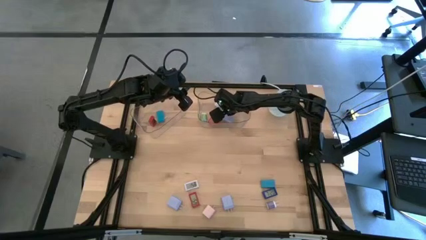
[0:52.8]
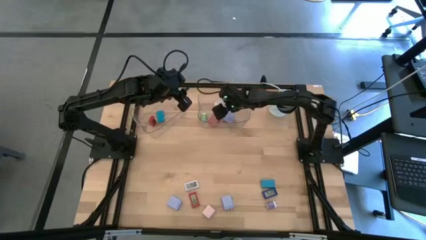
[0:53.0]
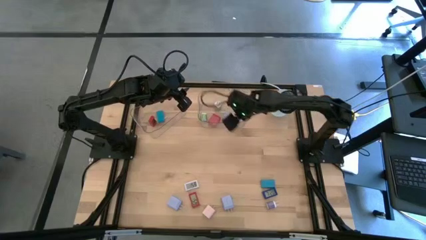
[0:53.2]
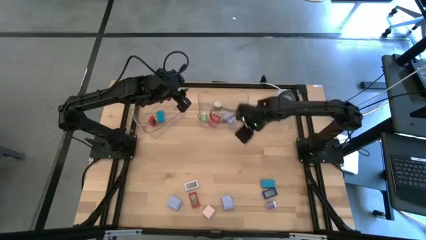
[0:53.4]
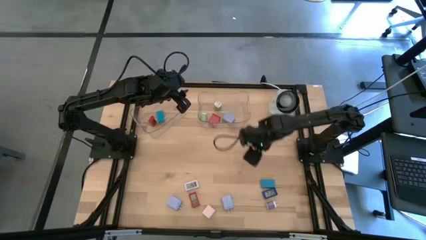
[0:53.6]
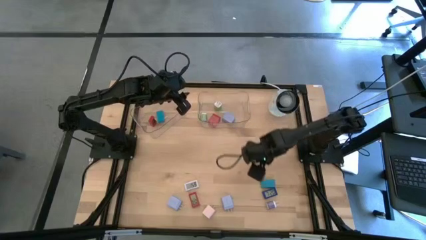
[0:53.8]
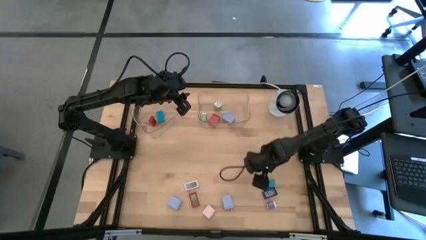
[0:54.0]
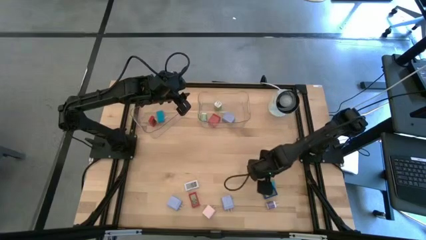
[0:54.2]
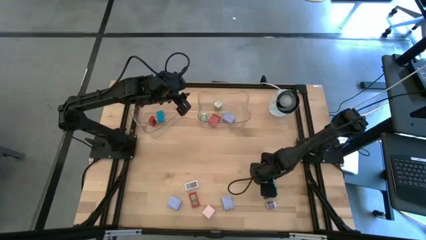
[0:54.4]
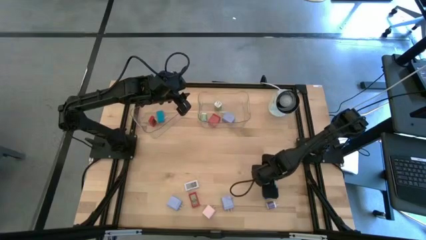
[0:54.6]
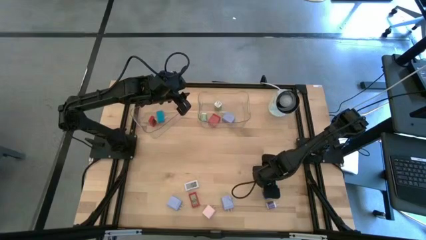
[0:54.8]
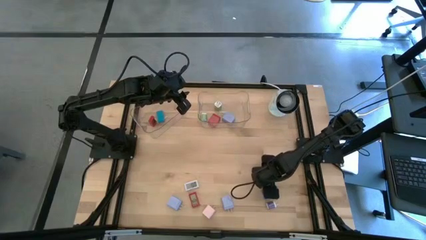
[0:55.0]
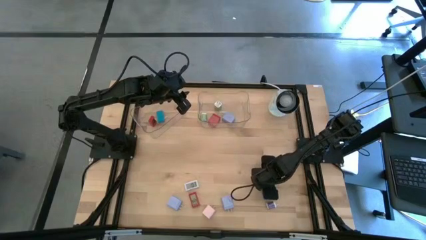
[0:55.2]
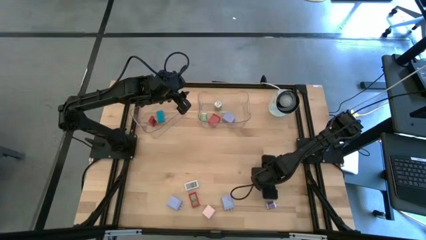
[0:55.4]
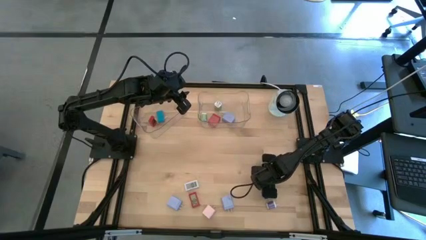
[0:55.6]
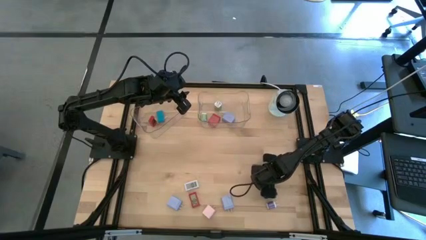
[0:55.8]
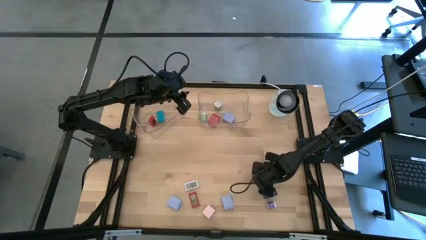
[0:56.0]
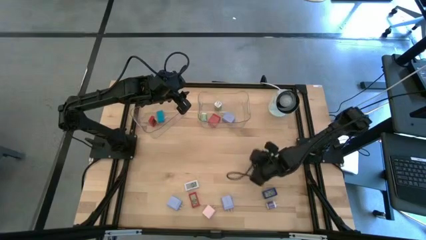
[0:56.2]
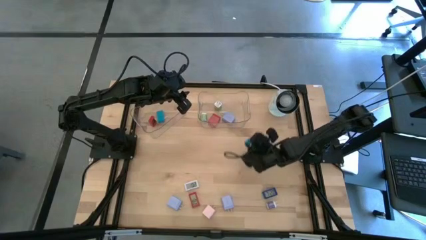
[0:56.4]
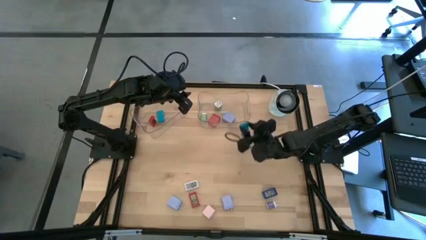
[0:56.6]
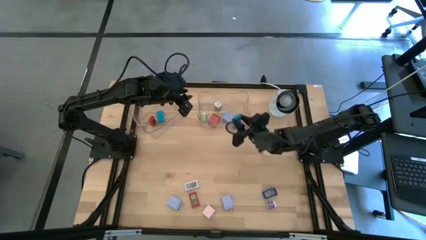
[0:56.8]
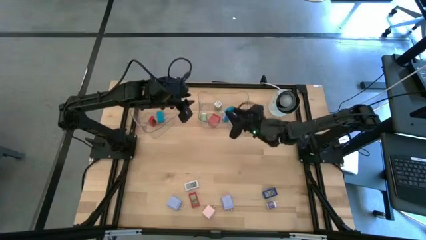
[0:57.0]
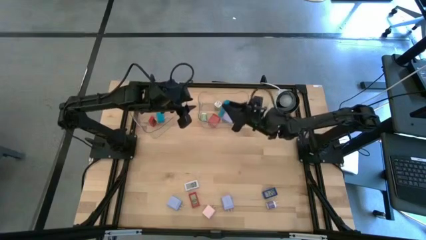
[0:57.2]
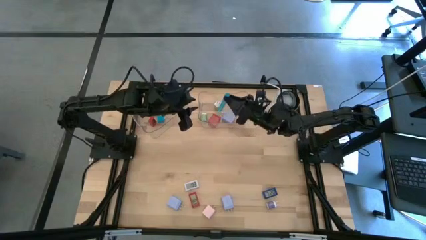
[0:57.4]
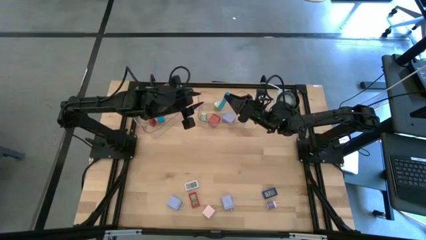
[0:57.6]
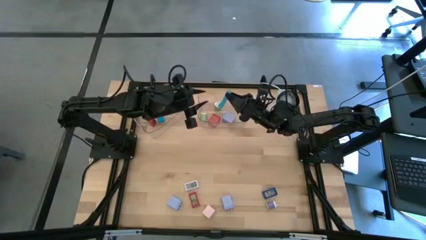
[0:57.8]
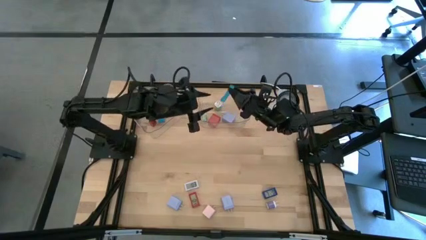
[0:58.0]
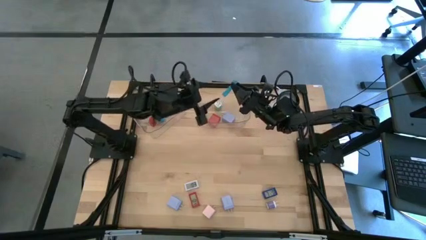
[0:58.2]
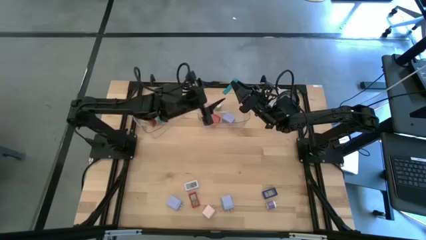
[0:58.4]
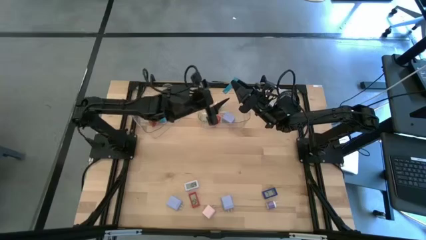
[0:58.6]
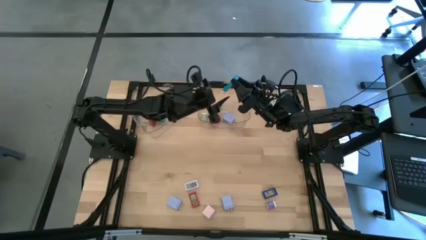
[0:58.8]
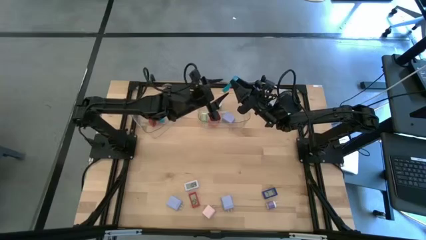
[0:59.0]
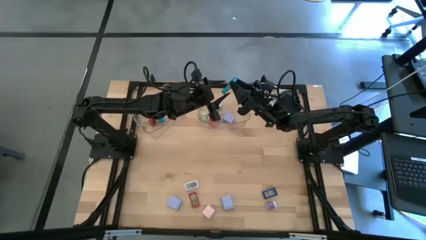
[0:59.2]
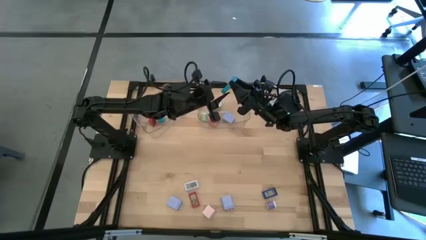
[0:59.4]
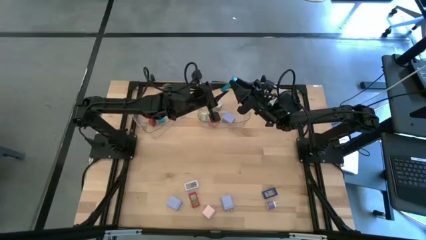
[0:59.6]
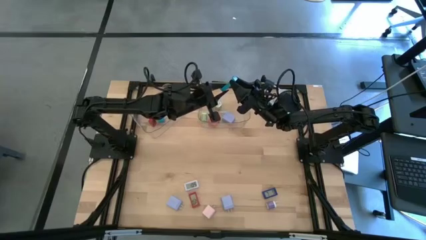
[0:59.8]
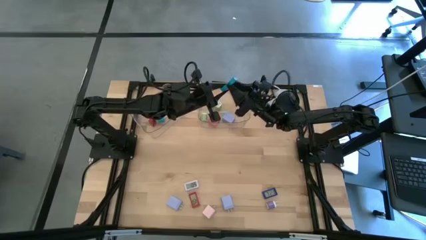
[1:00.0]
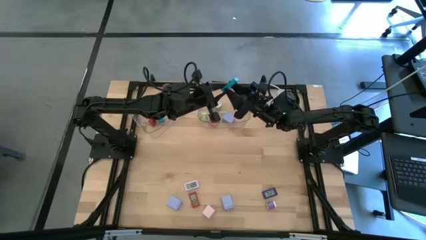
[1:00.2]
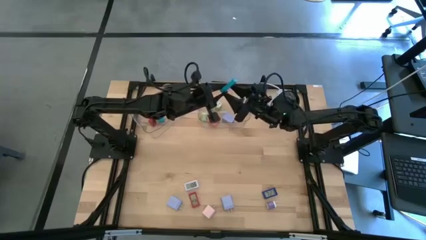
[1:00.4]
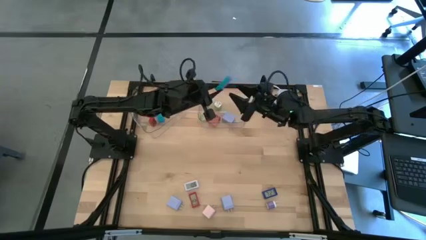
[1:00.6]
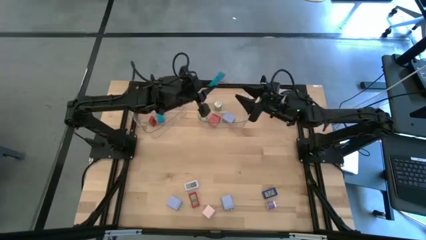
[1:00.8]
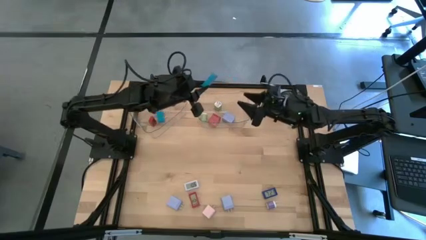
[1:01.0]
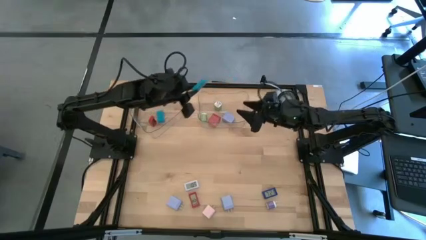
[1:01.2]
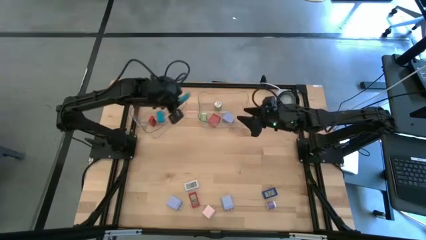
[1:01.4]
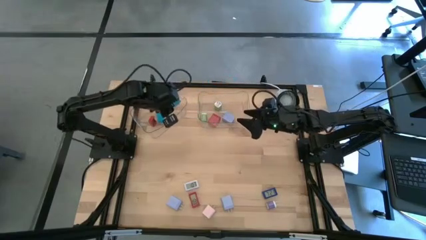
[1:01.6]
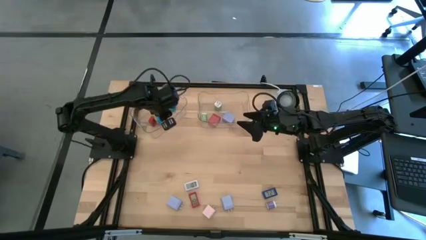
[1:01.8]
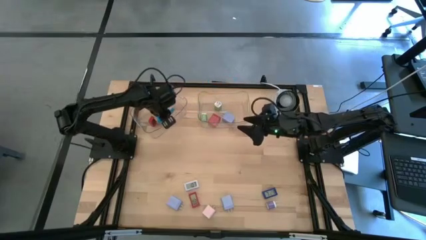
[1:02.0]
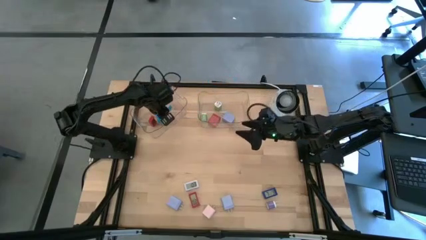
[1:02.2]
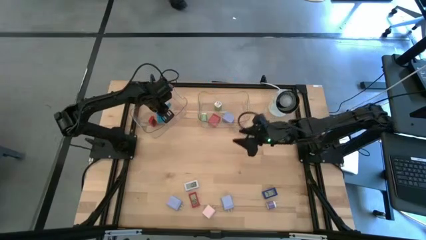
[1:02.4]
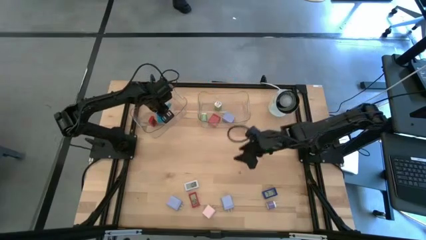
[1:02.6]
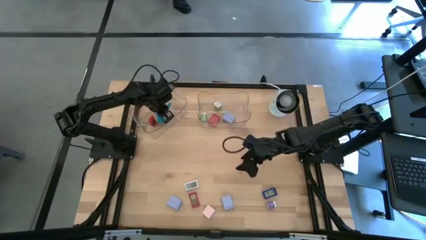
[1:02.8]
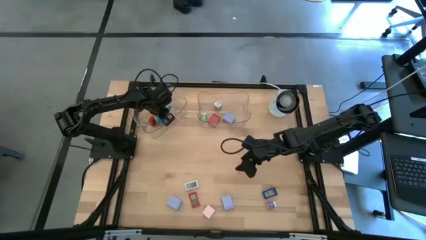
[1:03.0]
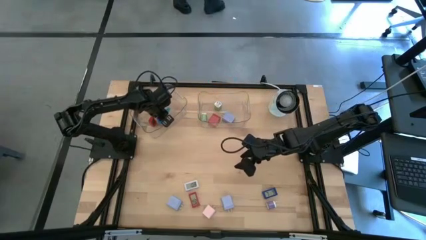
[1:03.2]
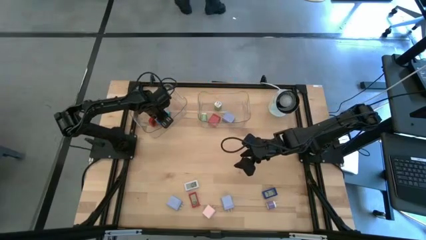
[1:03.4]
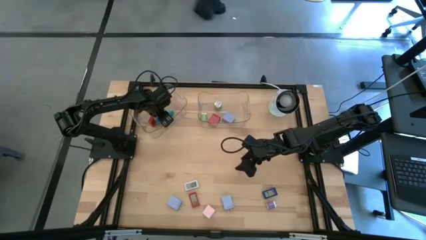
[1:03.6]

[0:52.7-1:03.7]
Task: Pick & Place Office items
Put the blue digital timer into the left transparent bin

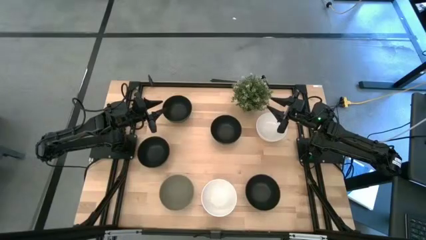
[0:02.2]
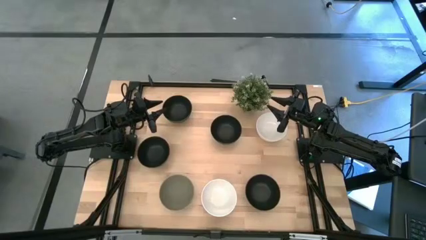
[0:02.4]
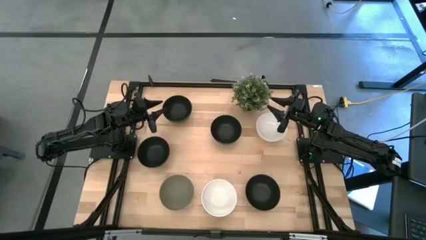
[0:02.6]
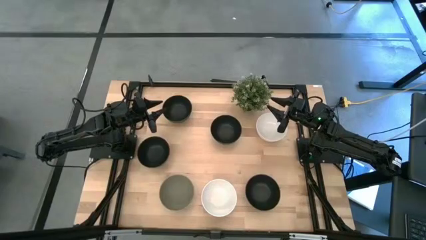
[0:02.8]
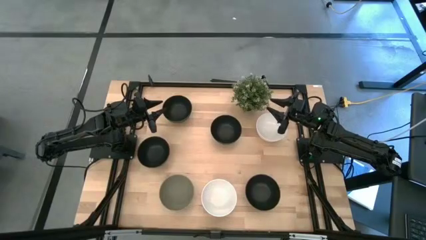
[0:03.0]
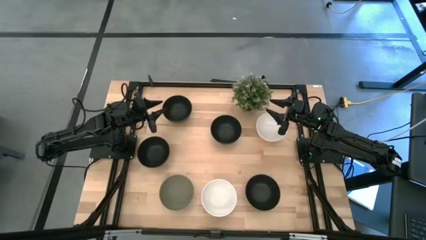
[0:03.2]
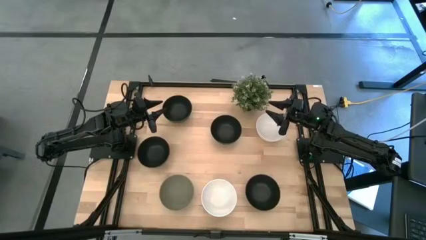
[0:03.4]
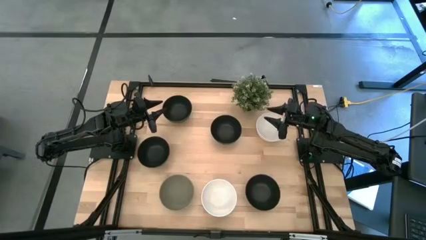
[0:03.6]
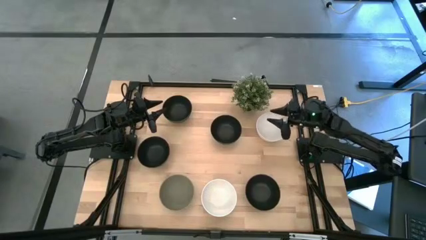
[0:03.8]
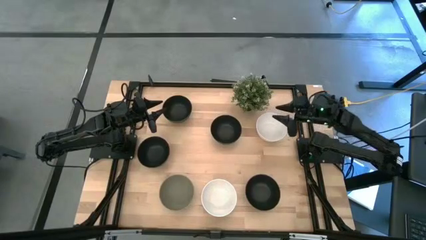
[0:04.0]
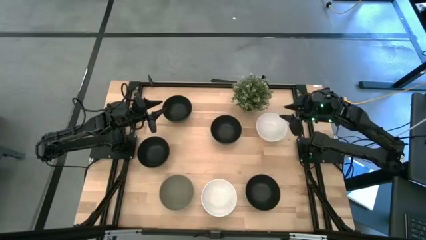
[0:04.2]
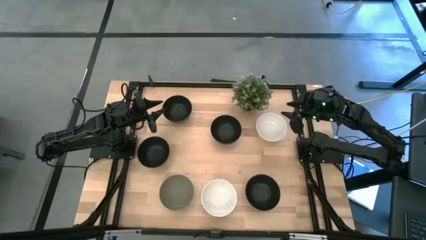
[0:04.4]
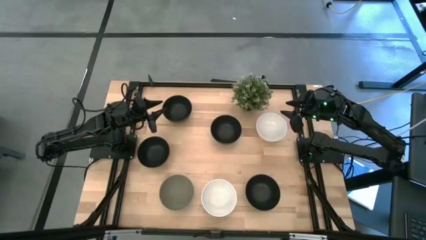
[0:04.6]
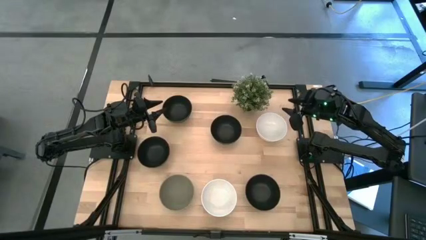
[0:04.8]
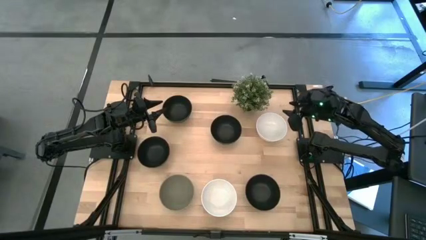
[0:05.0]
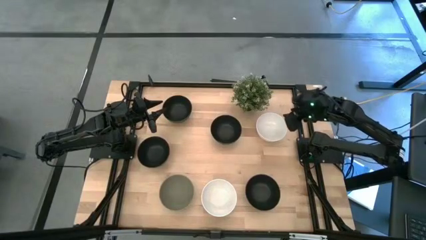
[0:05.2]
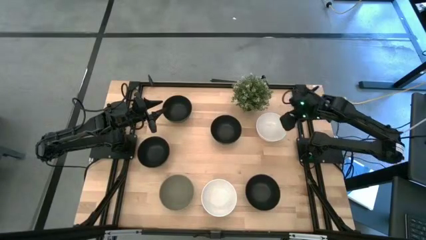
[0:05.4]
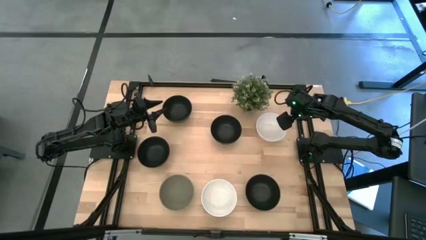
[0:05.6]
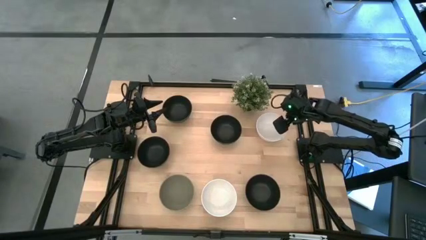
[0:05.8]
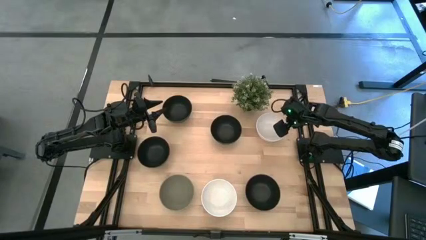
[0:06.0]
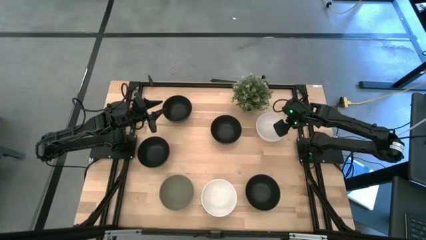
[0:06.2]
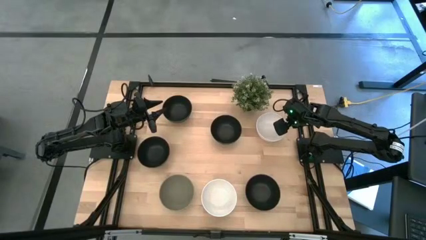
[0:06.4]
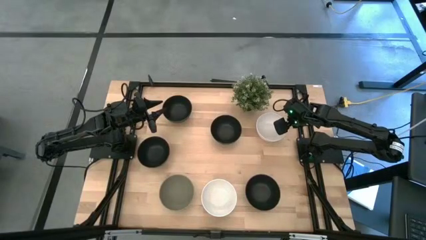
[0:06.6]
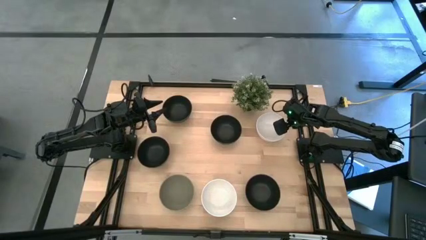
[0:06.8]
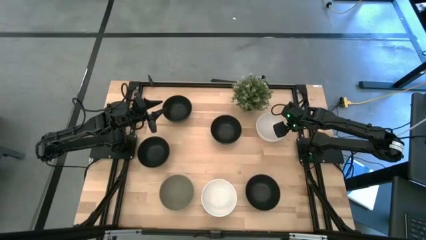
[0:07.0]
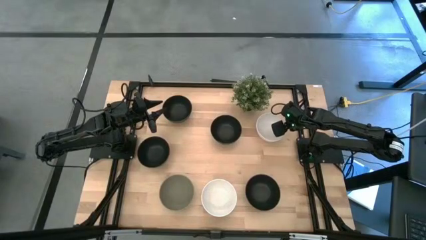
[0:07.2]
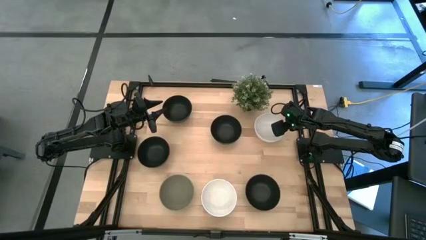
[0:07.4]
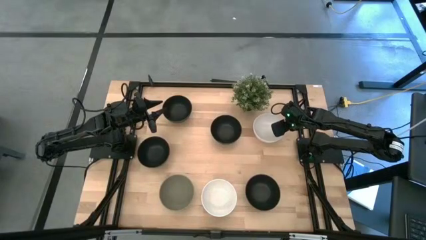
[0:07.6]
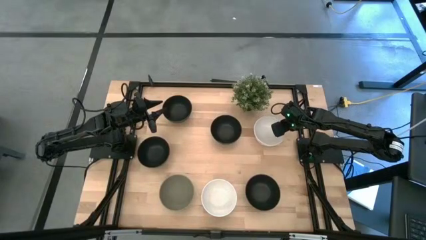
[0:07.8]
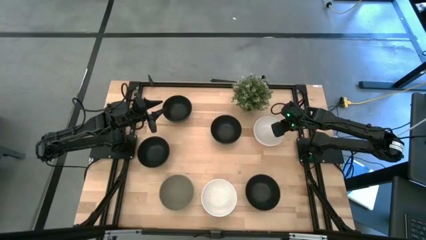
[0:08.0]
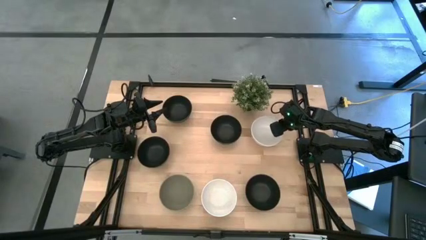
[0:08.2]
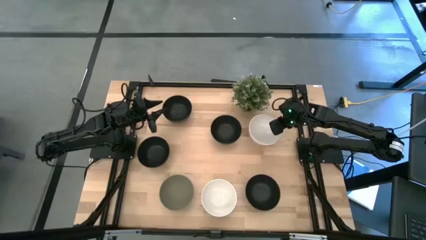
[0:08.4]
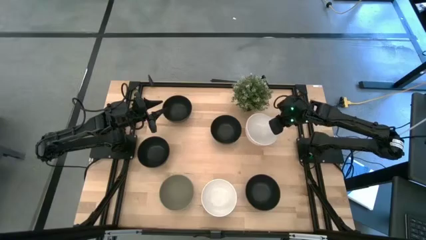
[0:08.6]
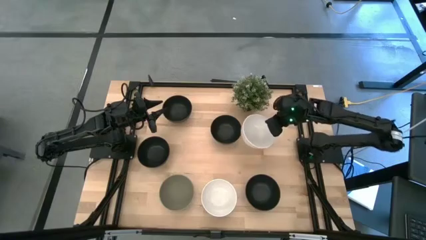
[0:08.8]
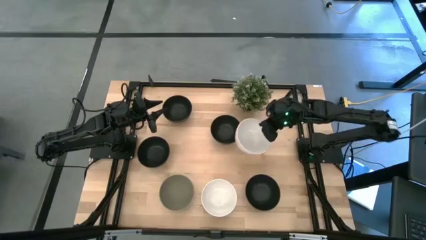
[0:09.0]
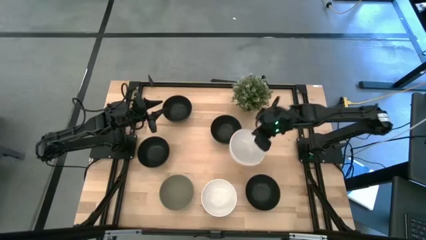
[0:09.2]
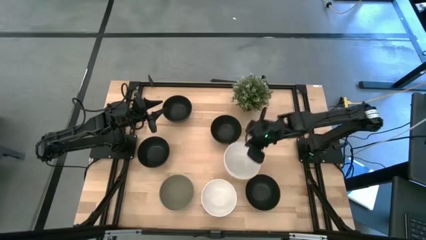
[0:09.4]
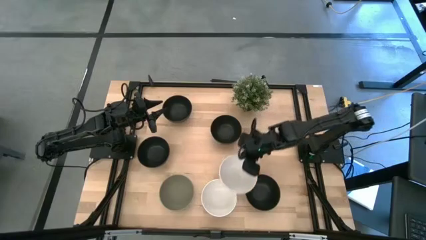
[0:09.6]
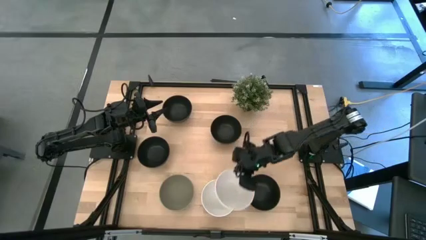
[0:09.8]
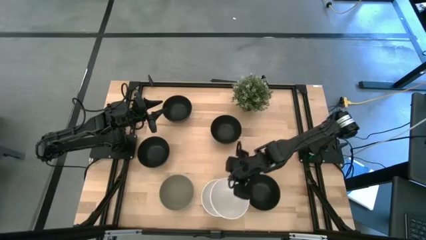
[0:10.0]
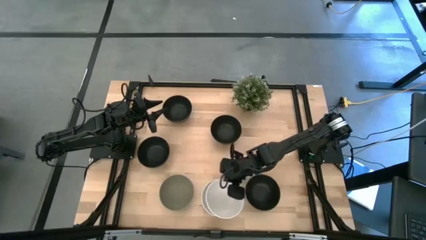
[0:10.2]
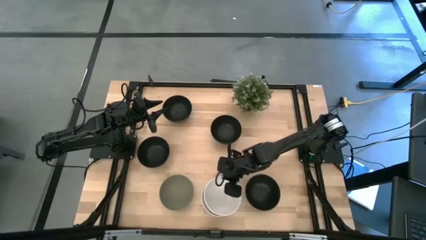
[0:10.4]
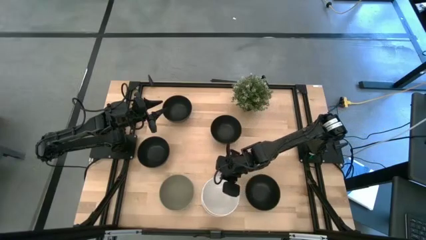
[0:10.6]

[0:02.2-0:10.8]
Task: Nest bowls inside each other
Stack the white bowl on top of the white bowl
